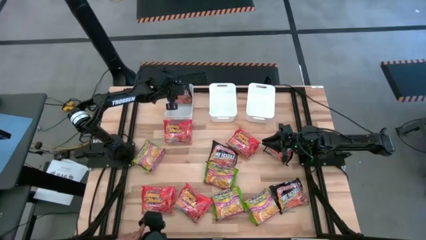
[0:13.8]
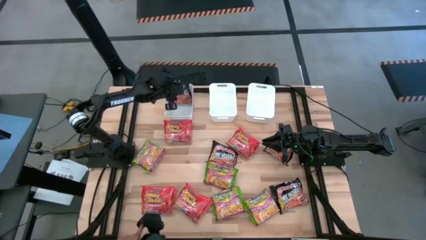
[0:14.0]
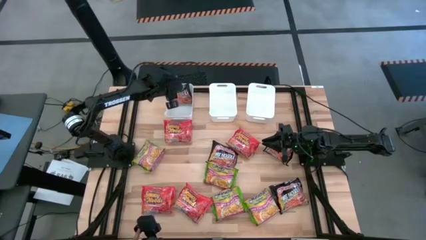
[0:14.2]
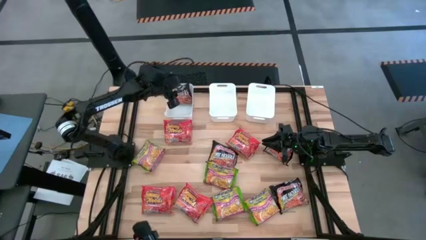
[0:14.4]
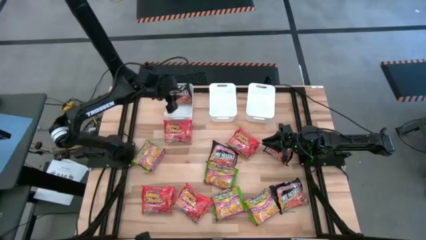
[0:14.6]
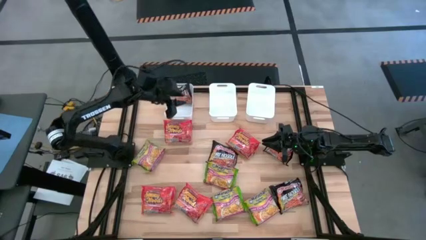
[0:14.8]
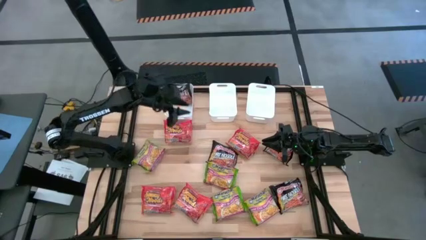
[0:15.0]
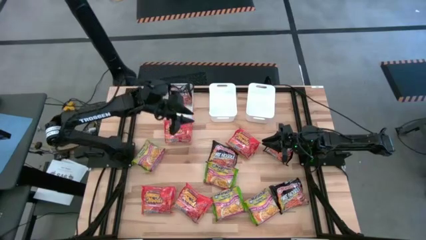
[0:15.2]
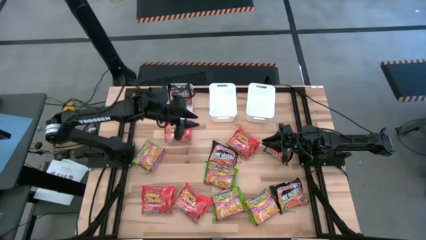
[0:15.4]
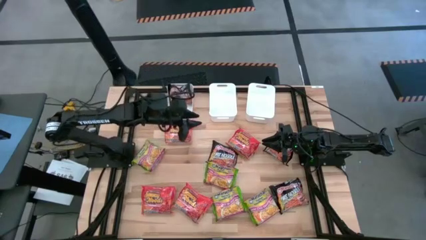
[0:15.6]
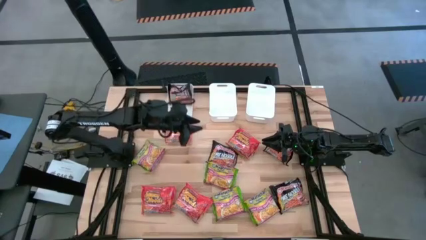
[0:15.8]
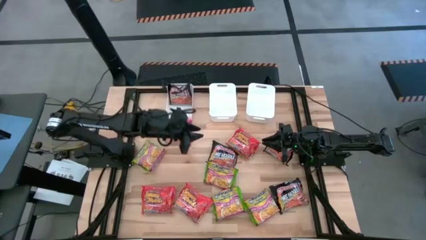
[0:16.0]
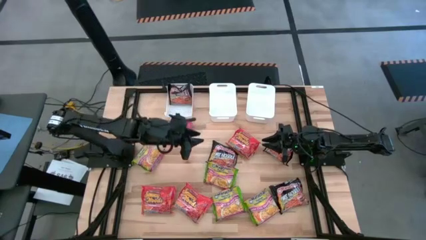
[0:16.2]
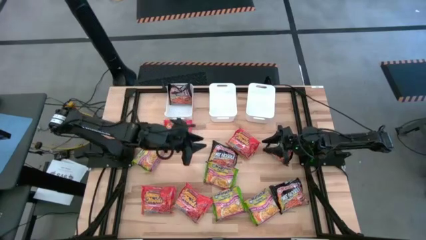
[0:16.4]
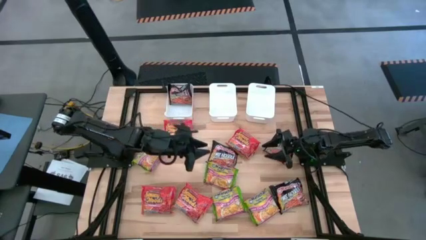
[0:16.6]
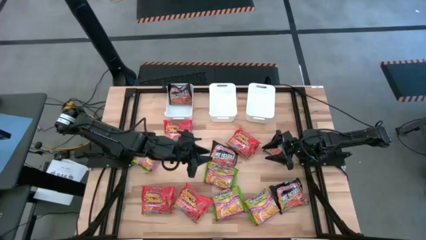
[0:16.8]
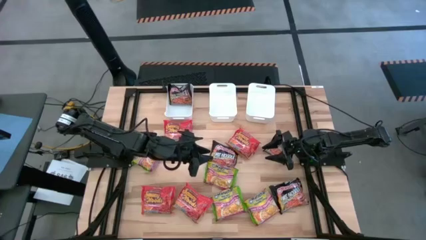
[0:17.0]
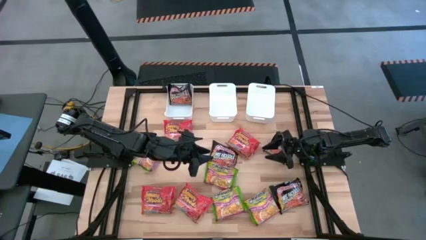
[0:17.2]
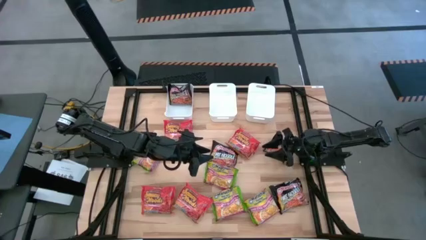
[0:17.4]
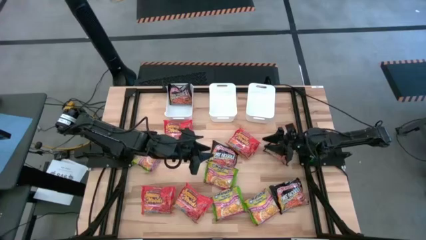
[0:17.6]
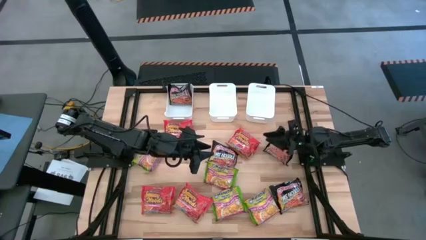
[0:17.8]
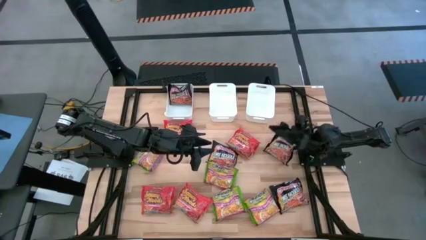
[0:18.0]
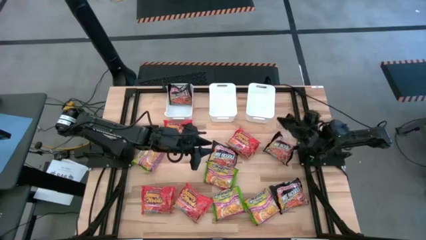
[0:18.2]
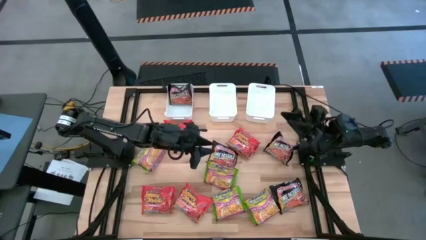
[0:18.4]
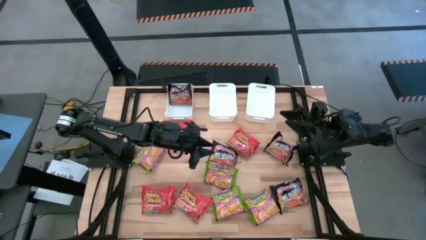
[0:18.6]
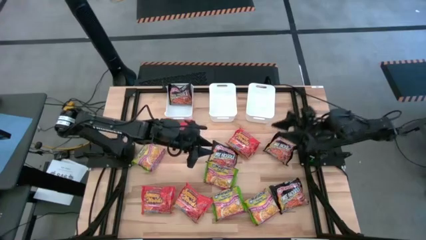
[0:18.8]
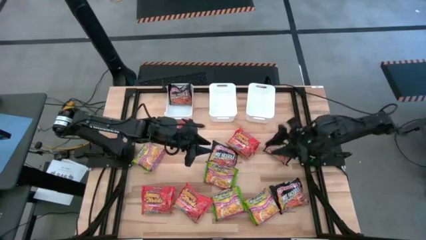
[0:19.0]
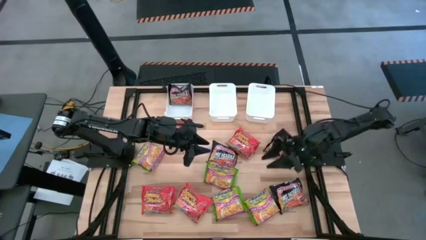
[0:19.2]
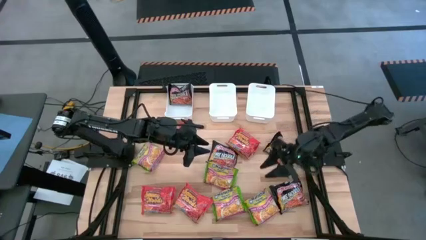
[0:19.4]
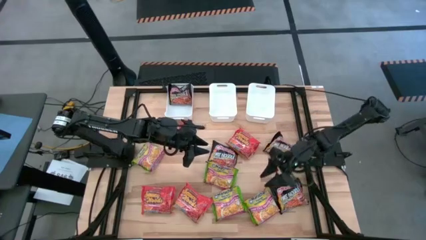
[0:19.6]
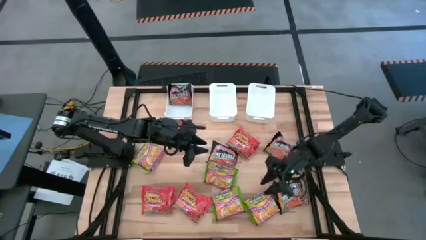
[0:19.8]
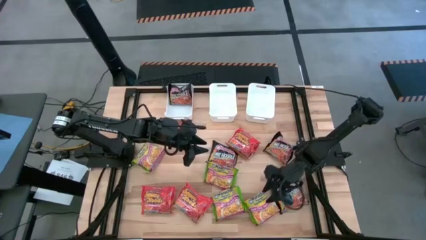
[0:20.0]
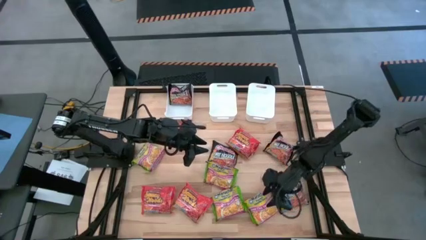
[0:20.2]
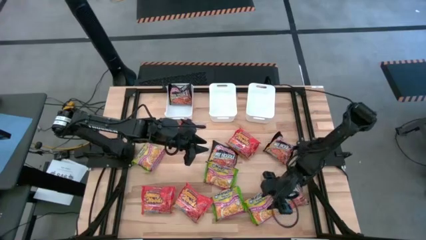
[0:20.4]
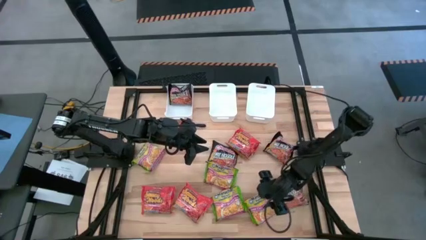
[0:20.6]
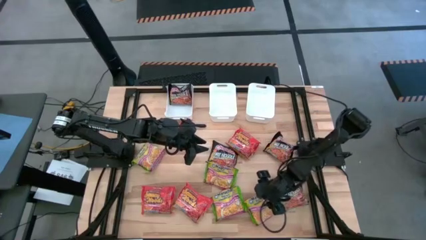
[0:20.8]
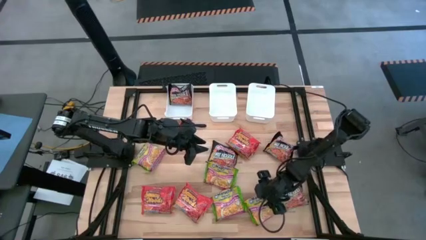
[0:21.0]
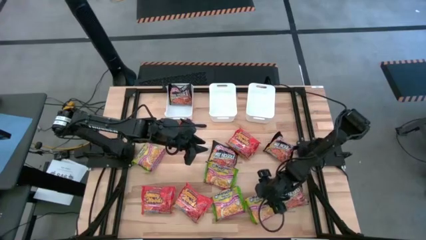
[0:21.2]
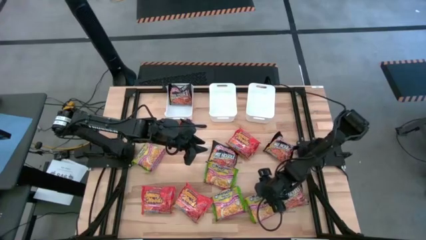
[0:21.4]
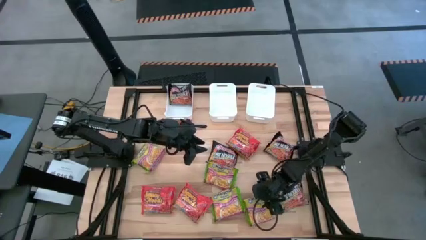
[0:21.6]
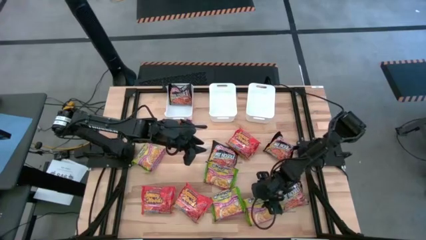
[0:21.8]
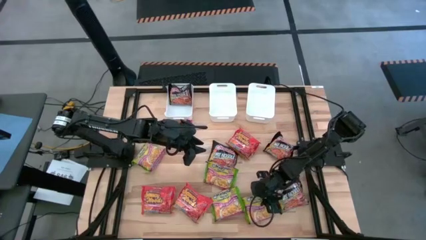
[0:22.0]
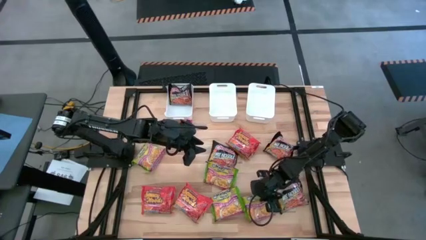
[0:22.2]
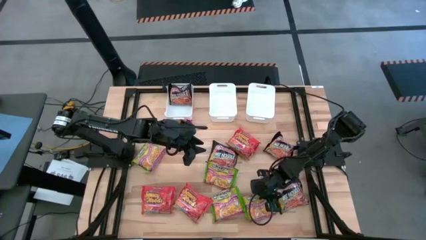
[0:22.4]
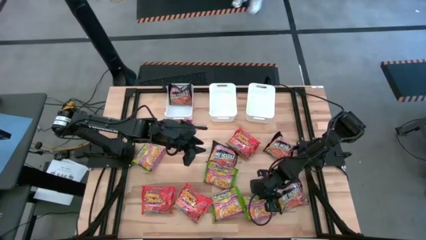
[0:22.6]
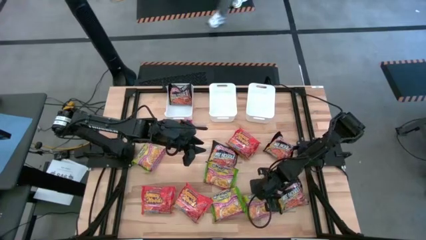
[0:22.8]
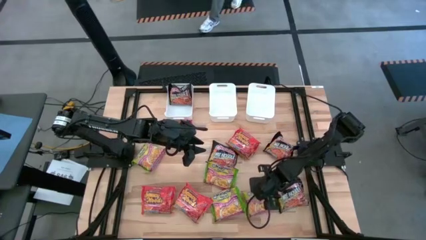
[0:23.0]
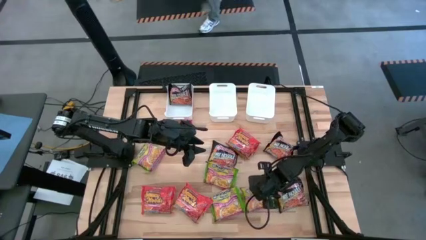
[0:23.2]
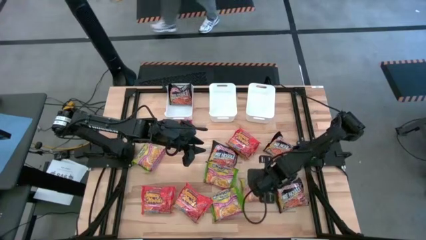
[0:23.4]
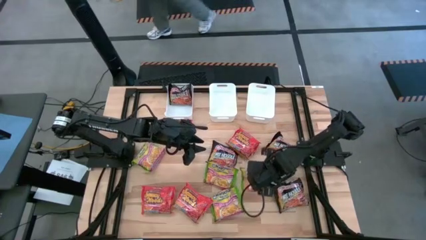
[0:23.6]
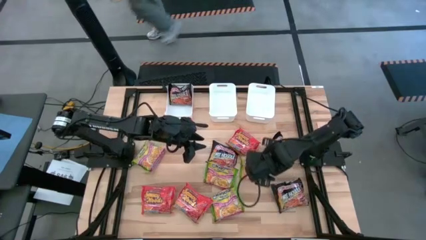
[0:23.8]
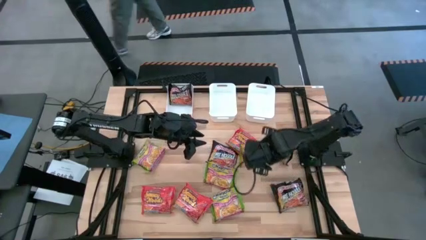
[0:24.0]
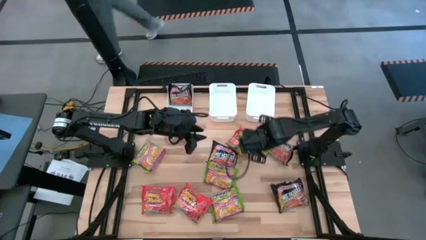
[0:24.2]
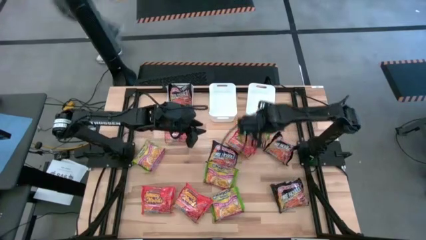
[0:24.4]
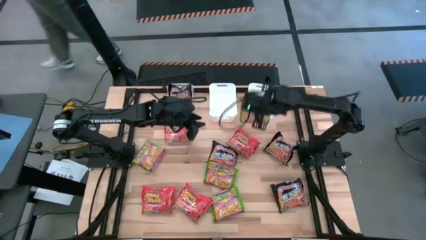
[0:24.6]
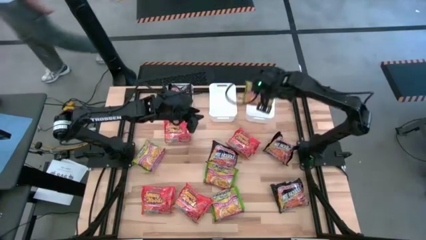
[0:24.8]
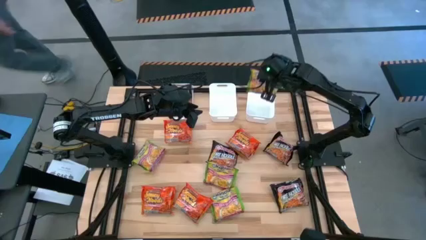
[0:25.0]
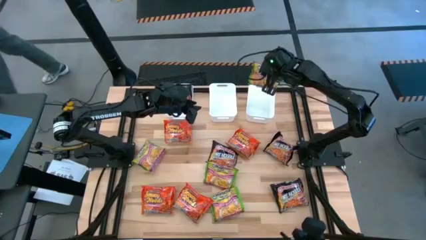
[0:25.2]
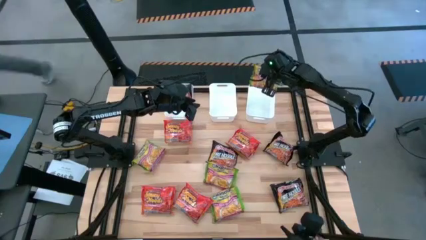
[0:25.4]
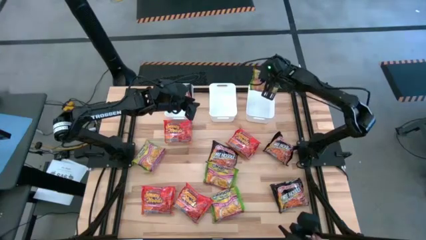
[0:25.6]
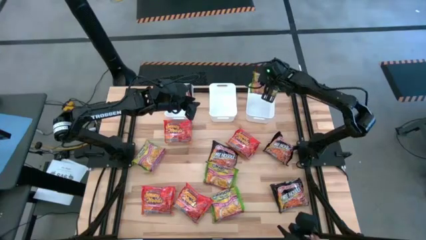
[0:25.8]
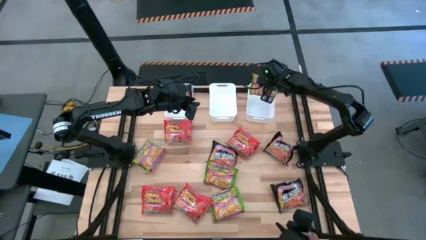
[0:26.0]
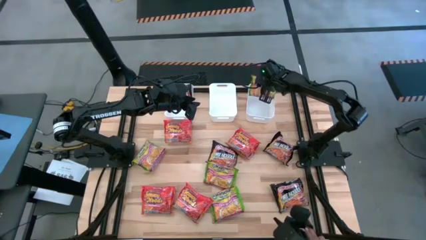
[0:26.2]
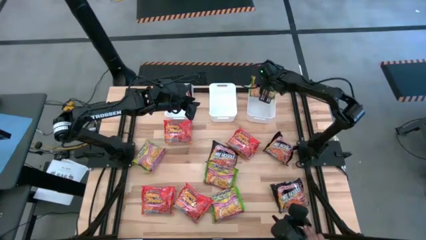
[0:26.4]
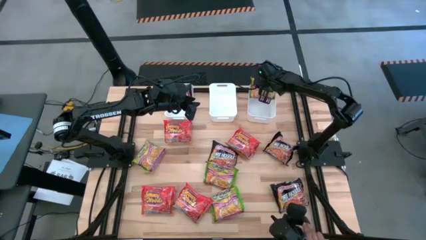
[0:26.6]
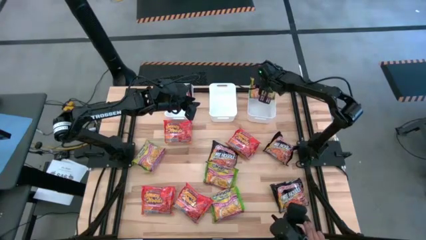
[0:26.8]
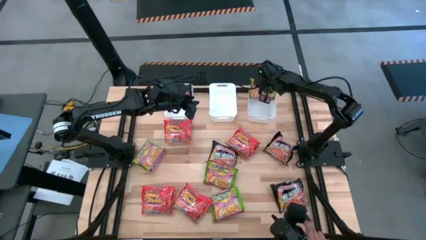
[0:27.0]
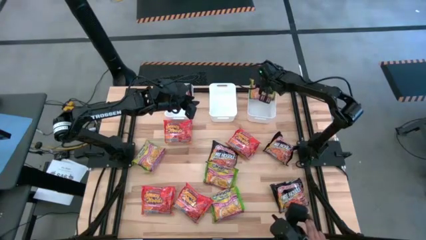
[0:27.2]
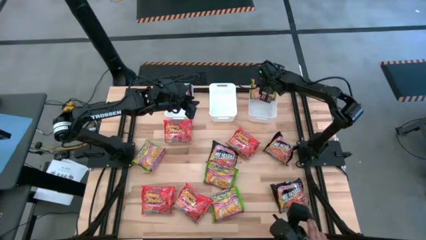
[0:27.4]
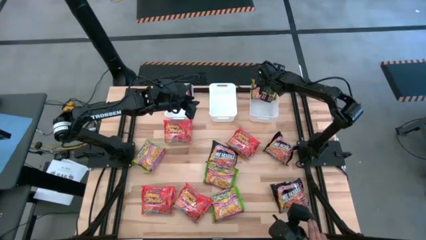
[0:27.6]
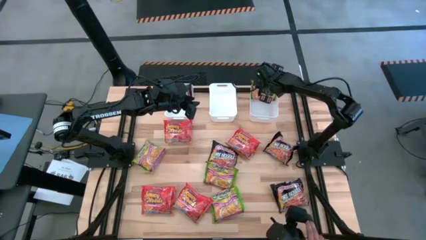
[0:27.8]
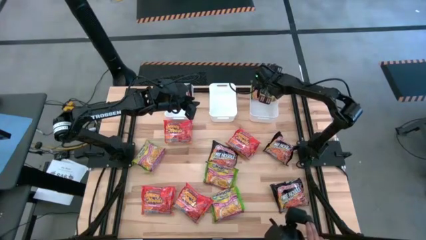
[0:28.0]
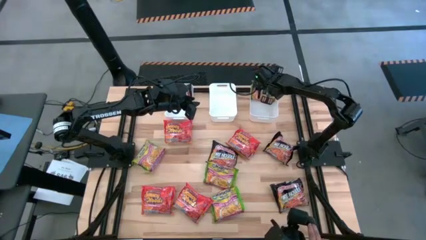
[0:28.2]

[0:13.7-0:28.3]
Task: Sort Maruchan noodles
Put the green noodle pack into the right white bin
